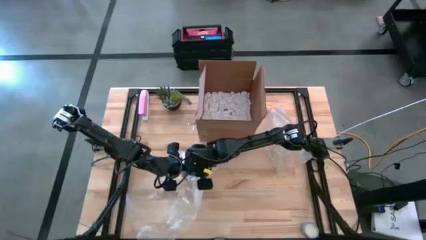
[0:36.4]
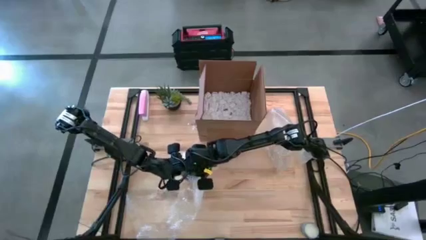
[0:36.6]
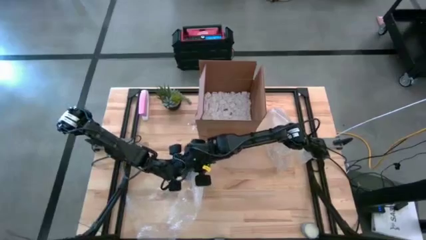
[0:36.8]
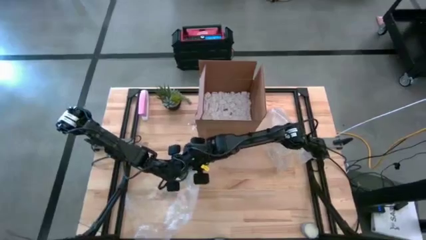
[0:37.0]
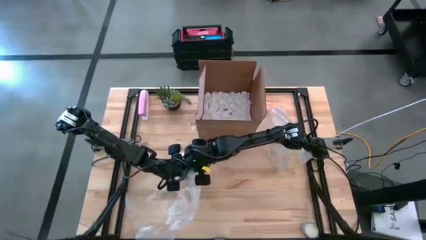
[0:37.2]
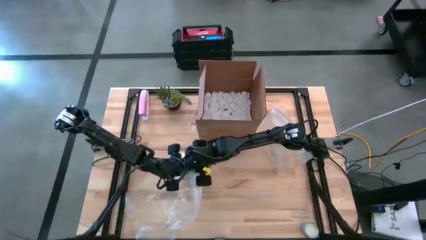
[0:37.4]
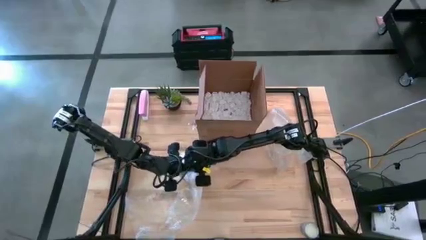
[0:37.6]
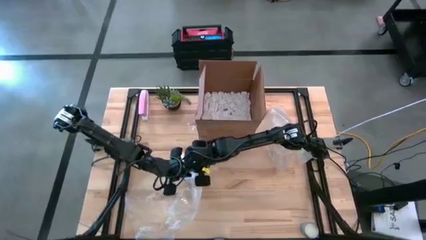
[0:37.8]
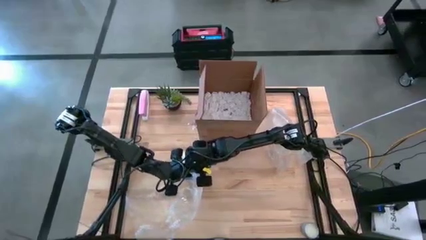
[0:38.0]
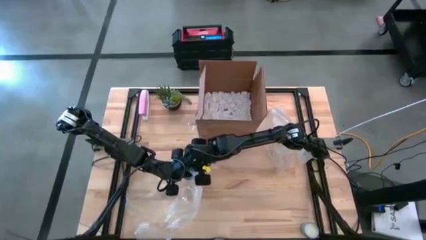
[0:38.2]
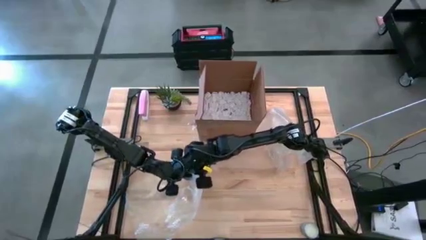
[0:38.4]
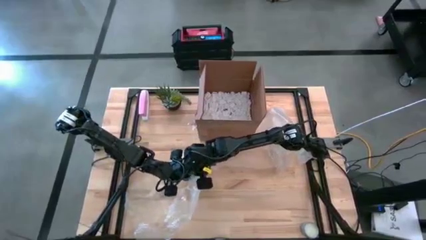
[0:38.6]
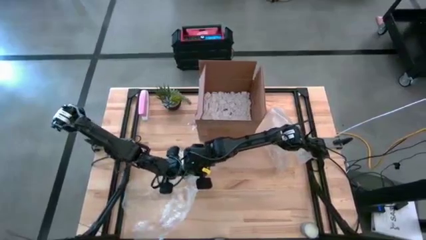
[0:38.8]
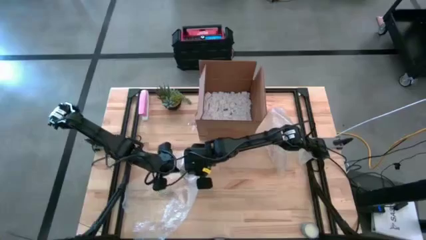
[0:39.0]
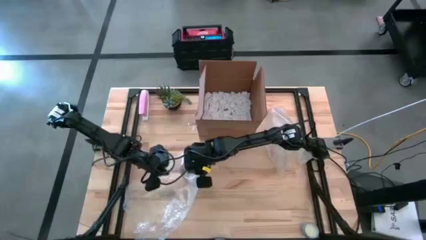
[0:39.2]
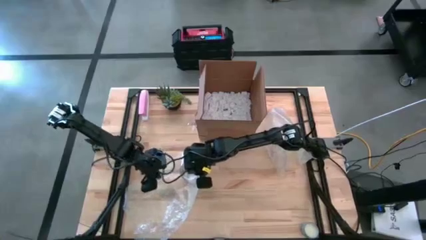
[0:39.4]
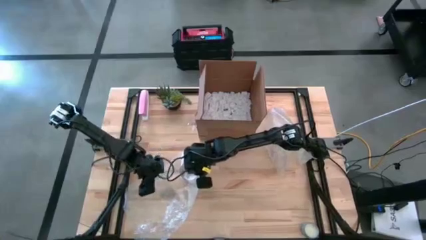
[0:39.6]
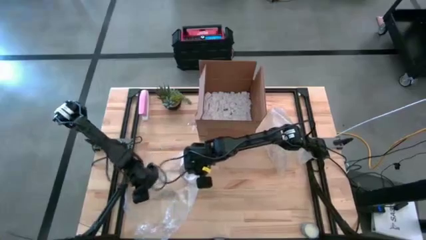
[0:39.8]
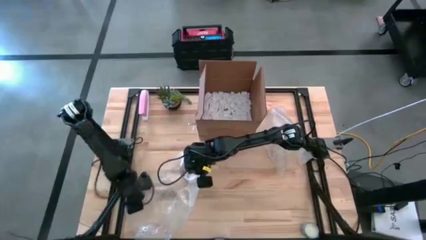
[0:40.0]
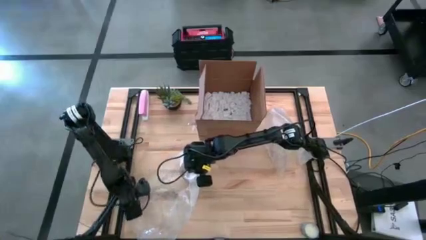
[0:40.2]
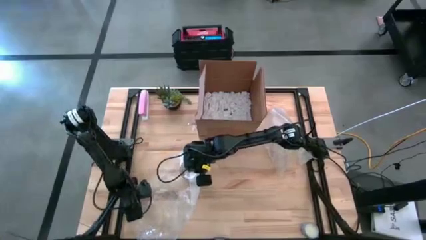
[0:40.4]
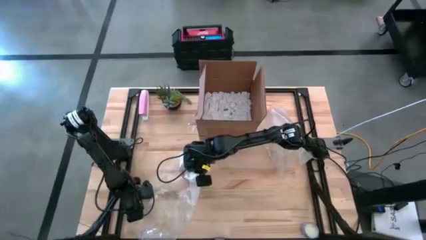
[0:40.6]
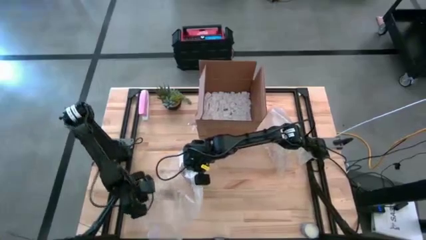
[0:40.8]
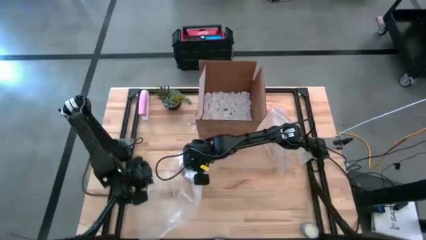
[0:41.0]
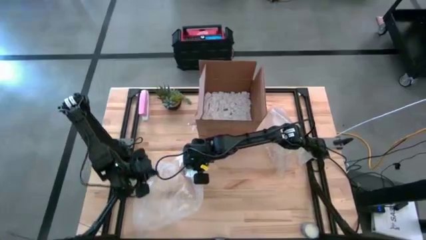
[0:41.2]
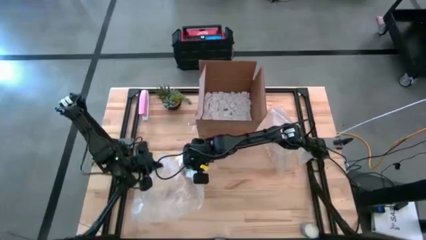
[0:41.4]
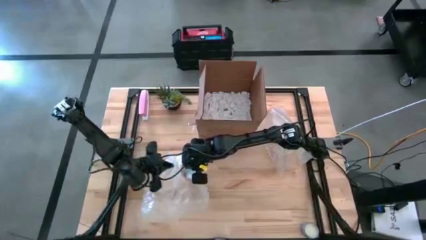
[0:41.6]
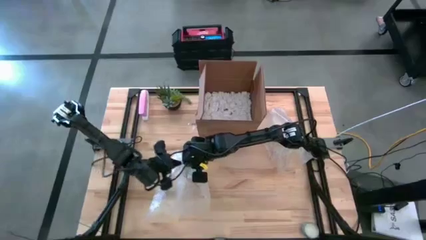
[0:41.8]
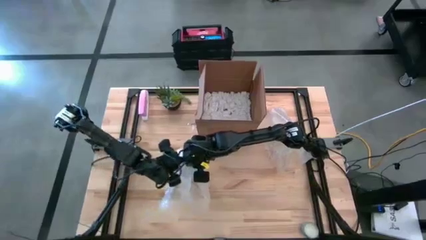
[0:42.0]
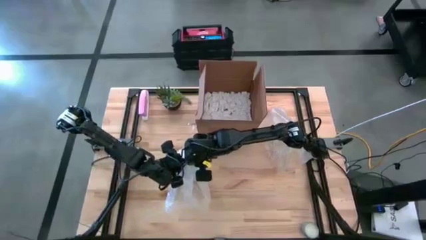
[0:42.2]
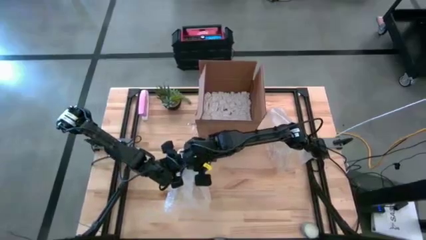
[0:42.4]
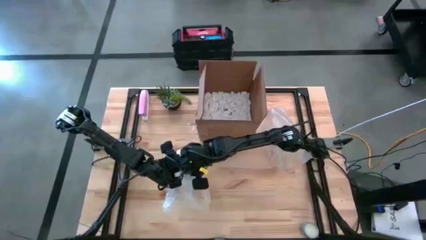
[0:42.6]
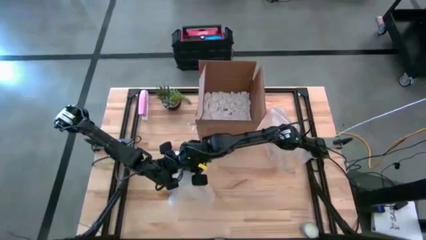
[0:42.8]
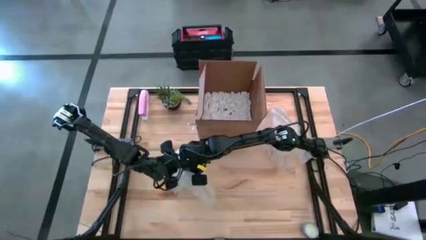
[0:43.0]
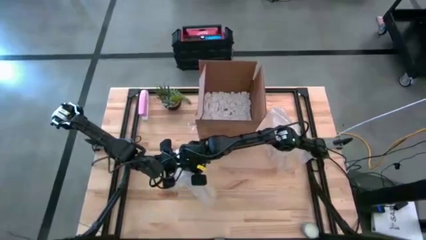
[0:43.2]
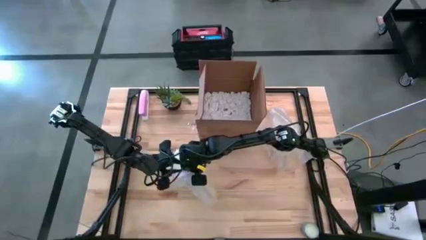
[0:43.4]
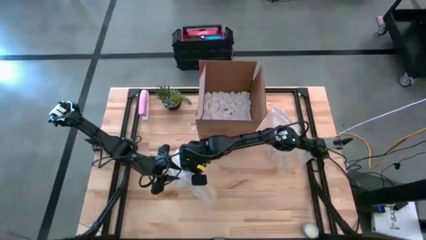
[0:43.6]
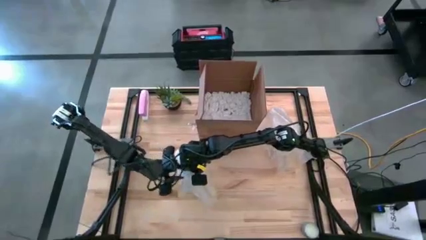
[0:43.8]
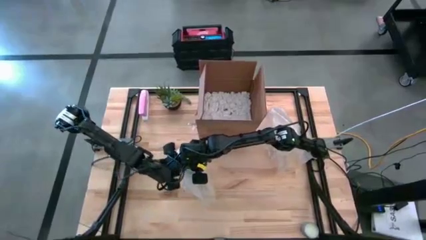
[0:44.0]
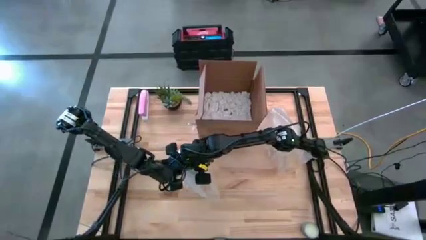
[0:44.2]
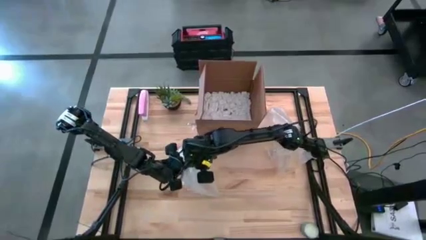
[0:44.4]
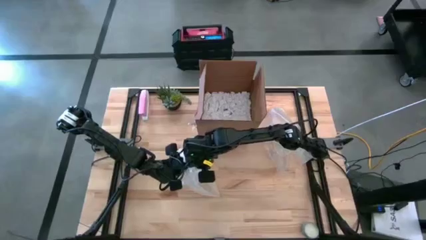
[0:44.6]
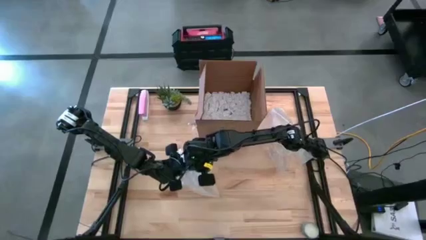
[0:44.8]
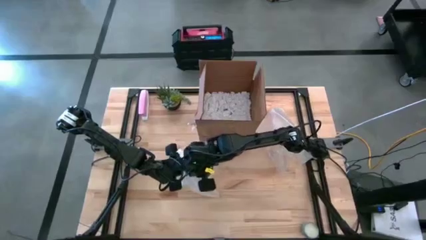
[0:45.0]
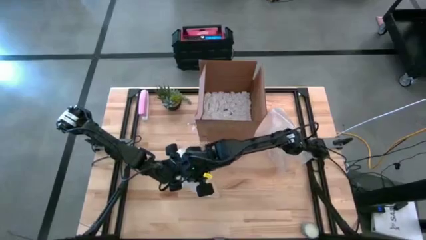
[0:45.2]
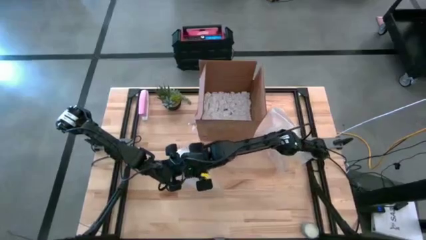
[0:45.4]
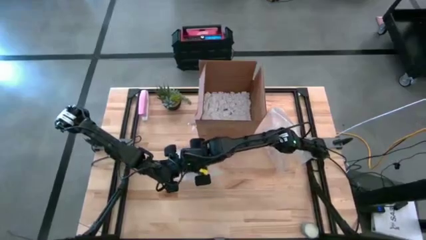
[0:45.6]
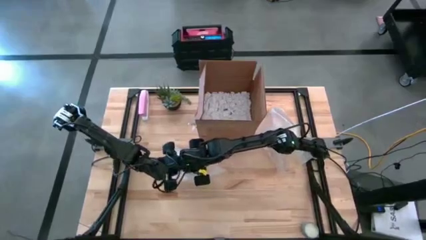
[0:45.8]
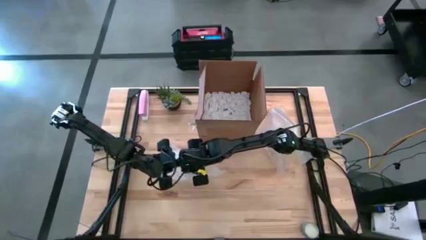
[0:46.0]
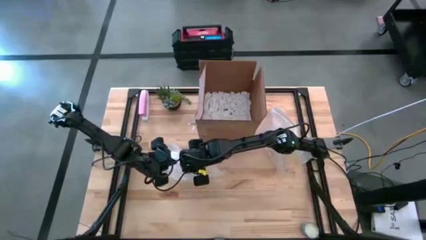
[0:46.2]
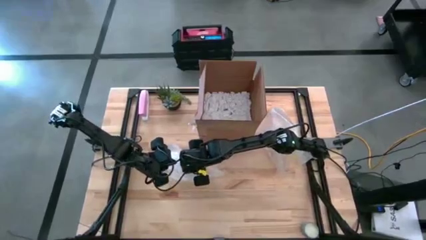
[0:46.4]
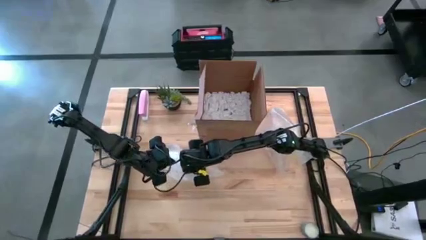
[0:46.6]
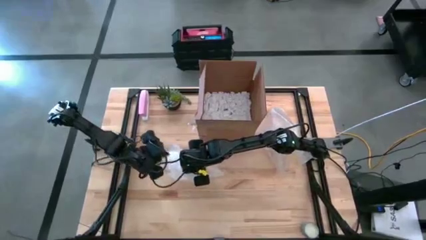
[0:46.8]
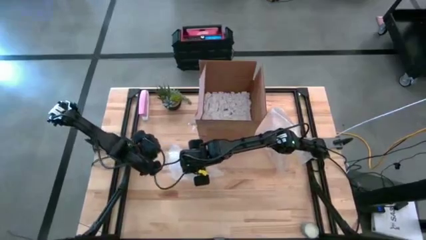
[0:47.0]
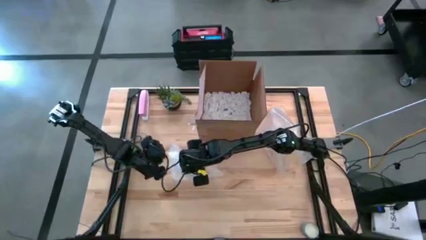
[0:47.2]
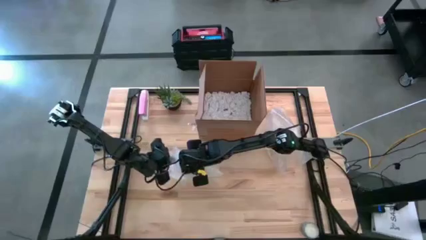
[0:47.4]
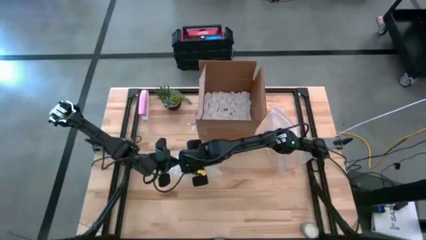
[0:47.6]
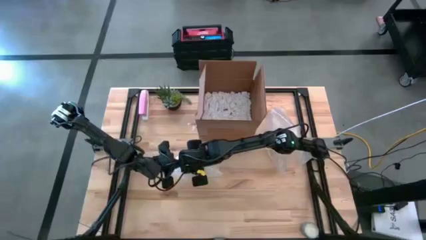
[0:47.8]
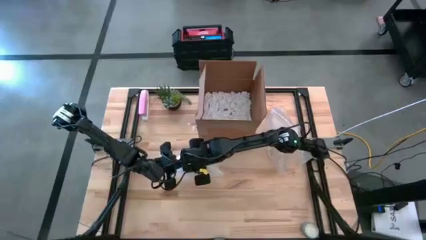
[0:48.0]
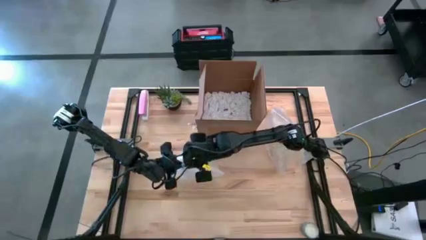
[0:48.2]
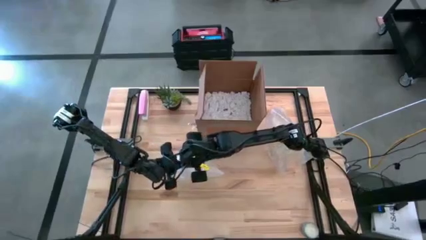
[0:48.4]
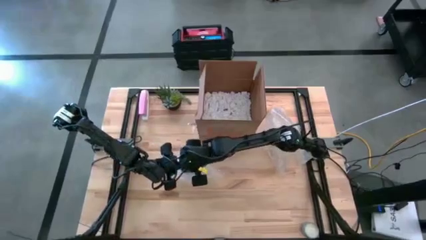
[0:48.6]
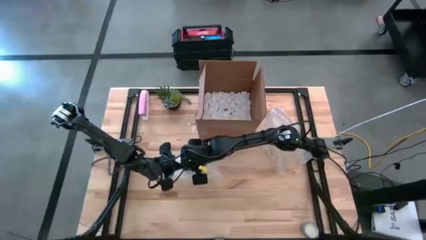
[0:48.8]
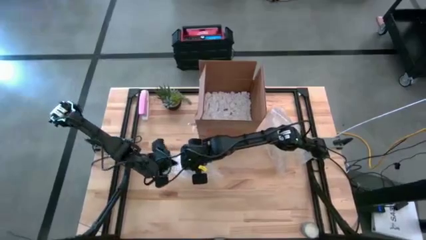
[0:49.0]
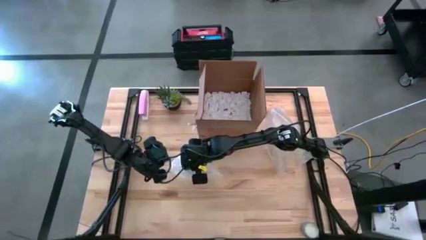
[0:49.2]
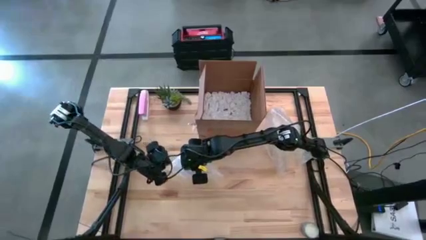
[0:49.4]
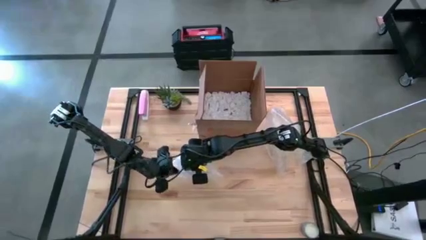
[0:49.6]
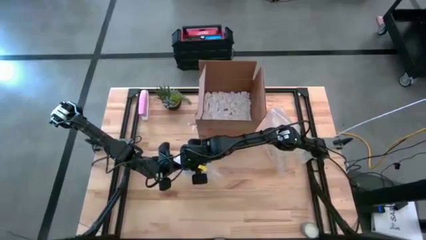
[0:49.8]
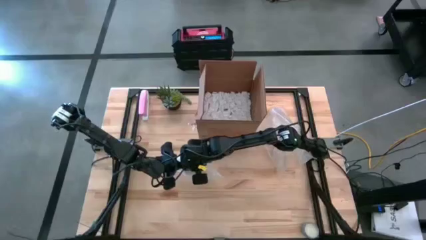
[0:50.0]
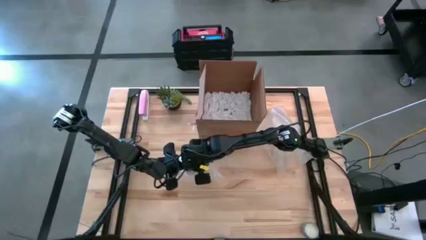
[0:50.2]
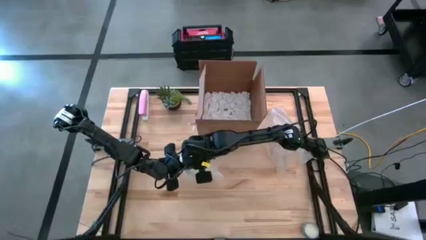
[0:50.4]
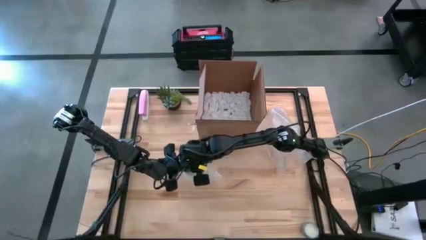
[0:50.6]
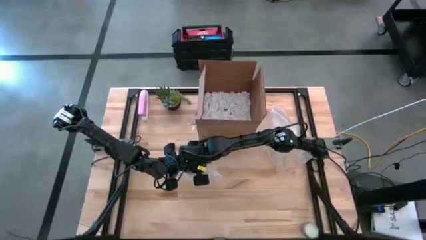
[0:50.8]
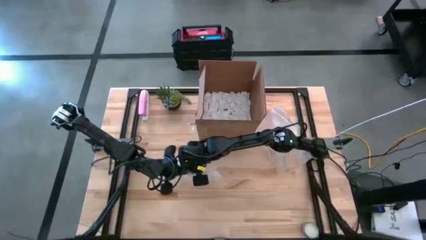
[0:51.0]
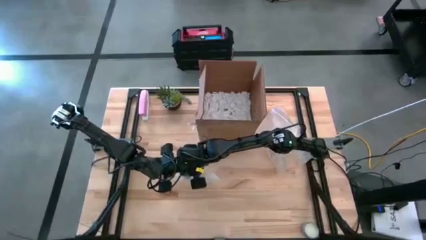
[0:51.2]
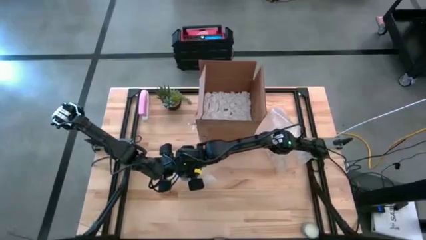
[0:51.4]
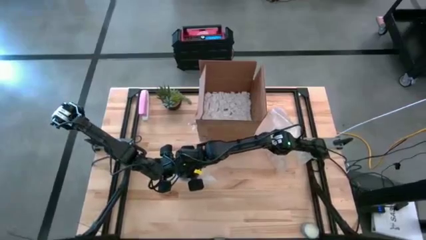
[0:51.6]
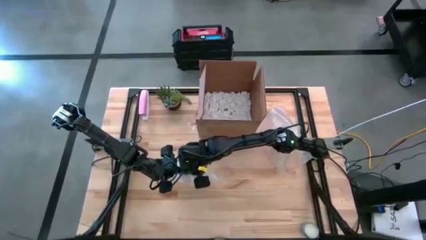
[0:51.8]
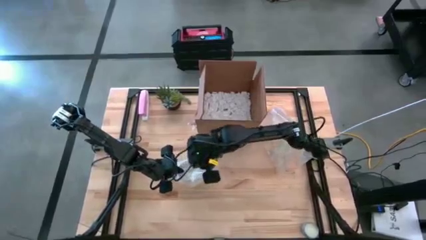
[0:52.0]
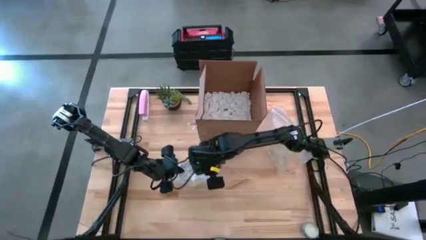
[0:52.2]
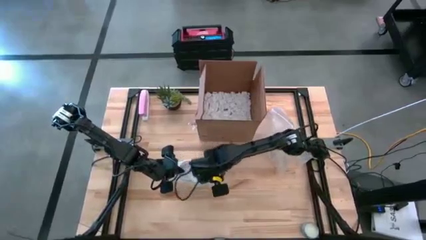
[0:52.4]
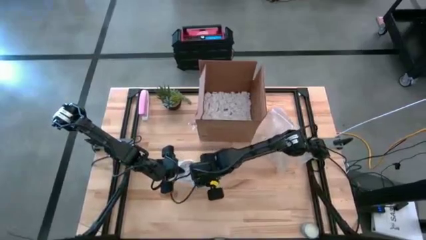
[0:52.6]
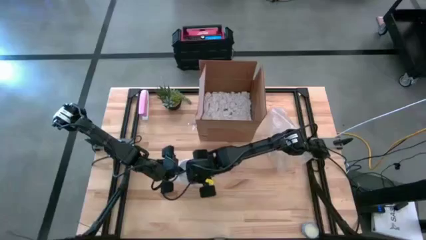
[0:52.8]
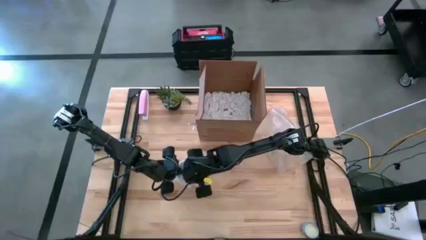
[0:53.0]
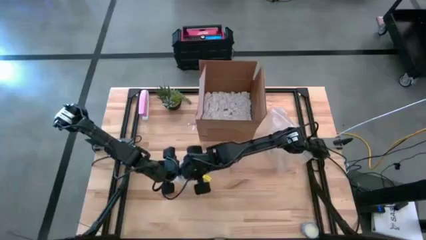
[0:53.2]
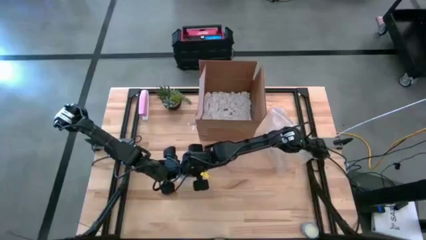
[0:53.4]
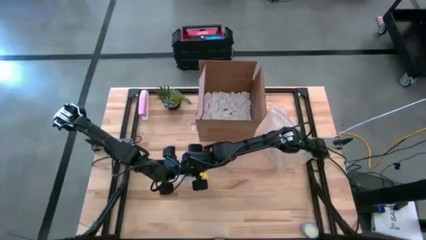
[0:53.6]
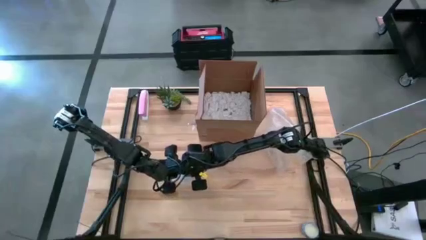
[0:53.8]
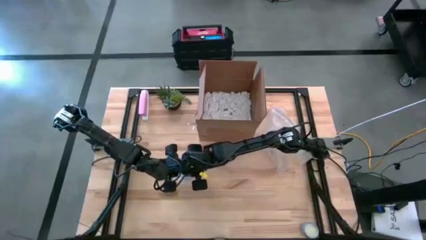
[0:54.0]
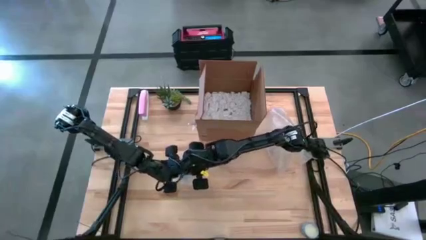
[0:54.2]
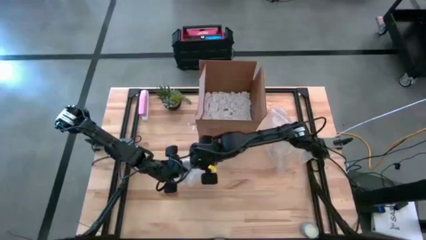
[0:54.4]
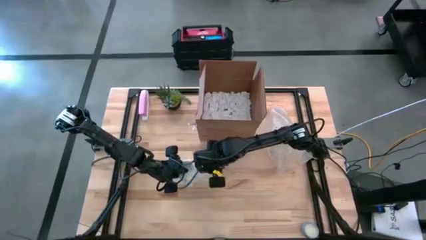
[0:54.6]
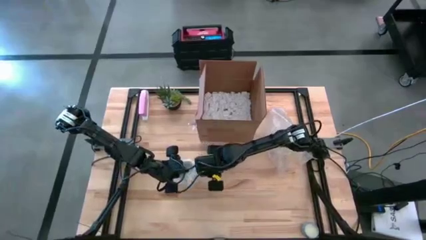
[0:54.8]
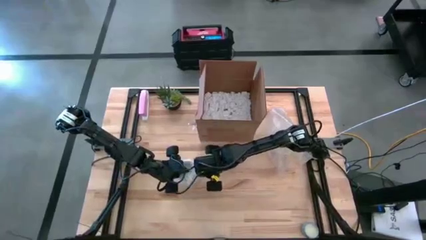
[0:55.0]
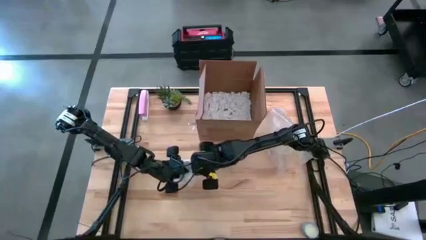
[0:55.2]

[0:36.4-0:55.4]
Task: wrap mug
Wrap the gray mug with bubble wrap
